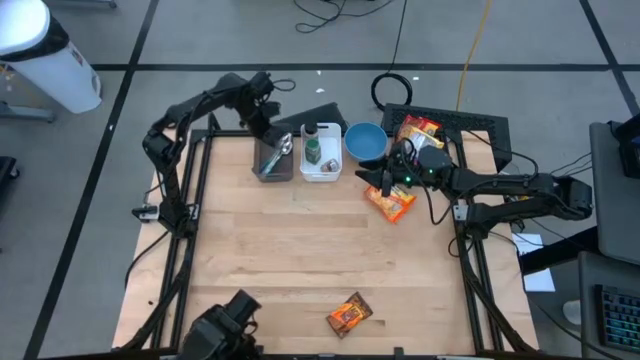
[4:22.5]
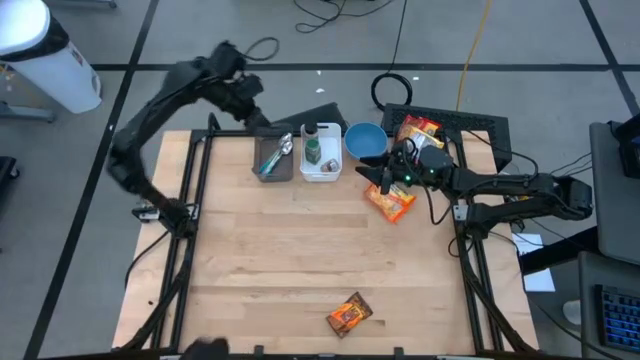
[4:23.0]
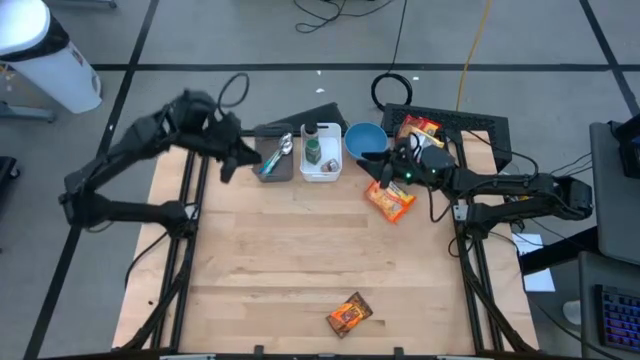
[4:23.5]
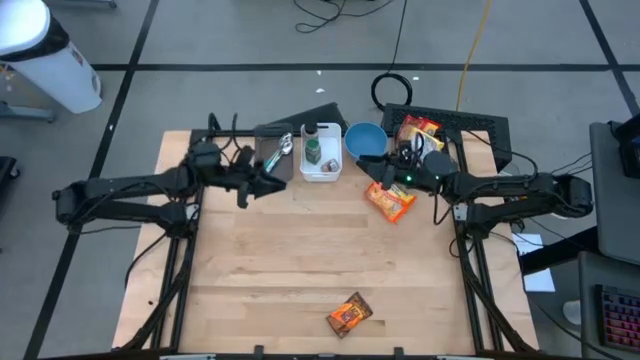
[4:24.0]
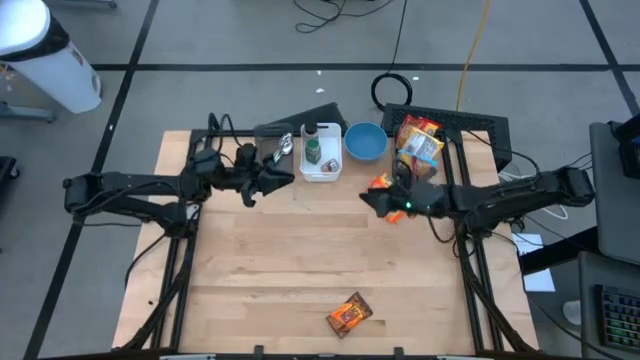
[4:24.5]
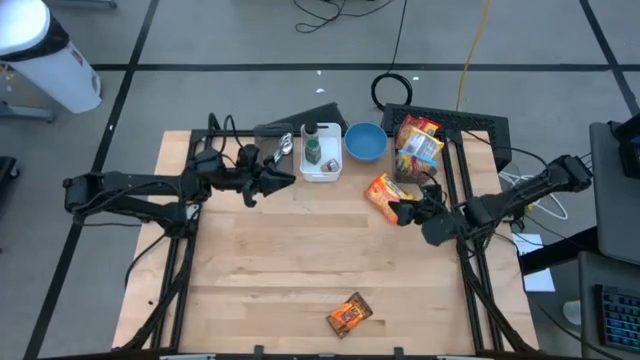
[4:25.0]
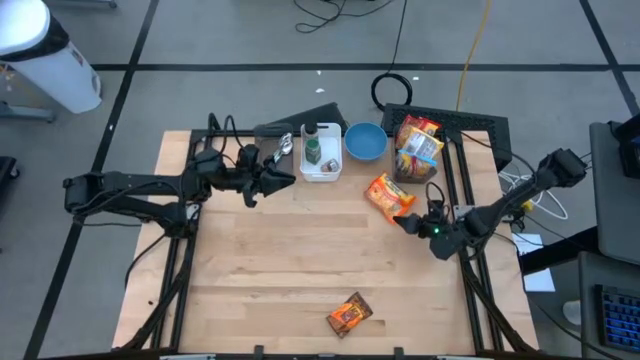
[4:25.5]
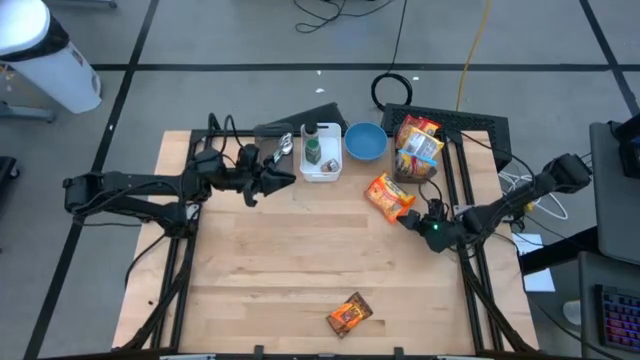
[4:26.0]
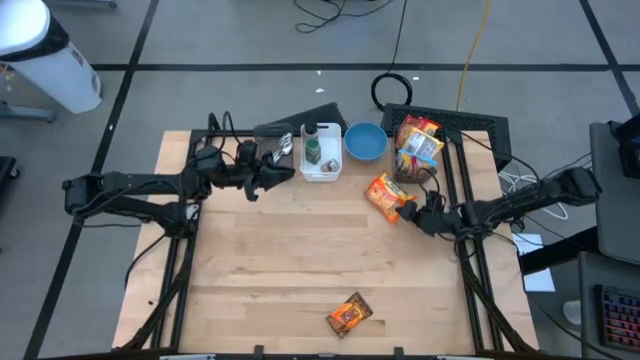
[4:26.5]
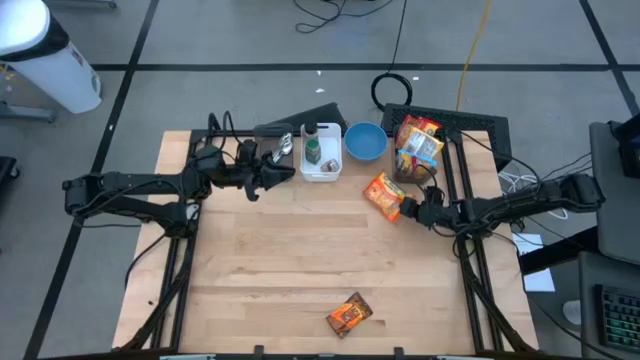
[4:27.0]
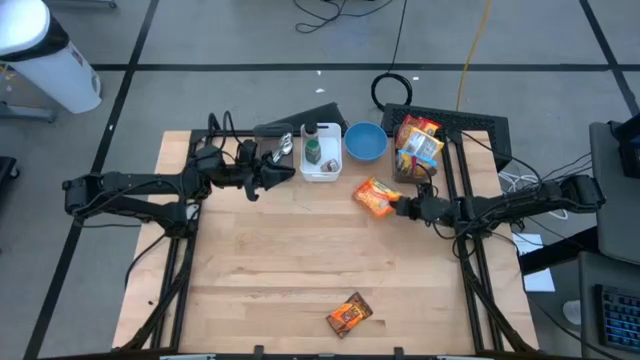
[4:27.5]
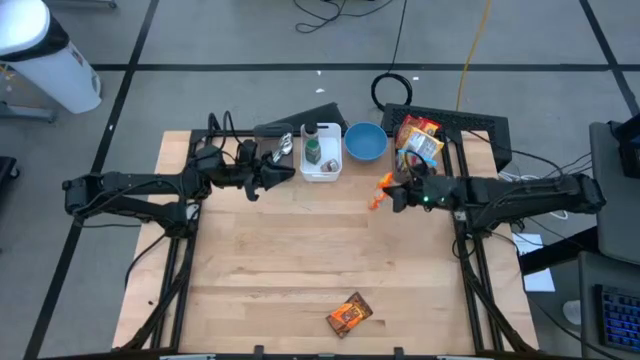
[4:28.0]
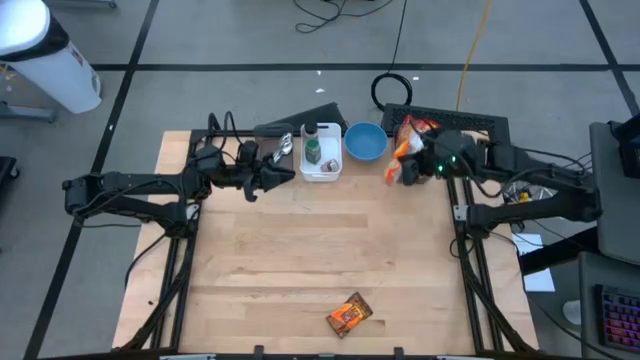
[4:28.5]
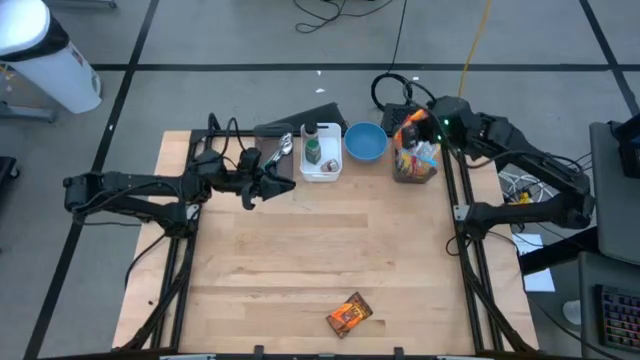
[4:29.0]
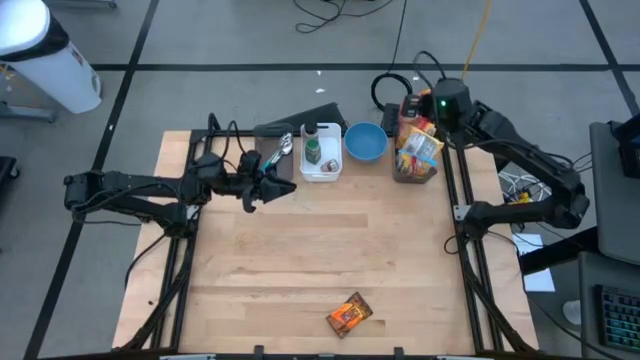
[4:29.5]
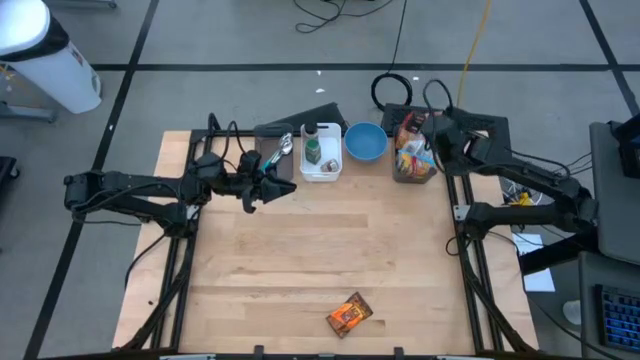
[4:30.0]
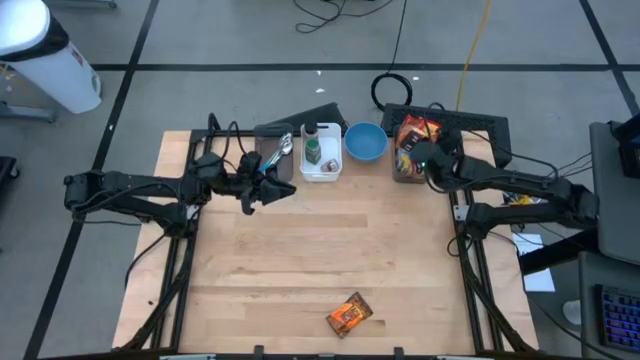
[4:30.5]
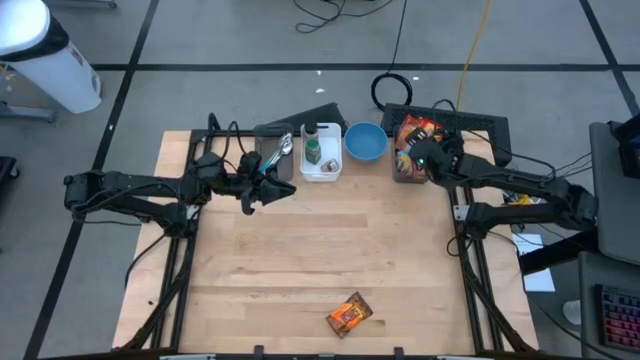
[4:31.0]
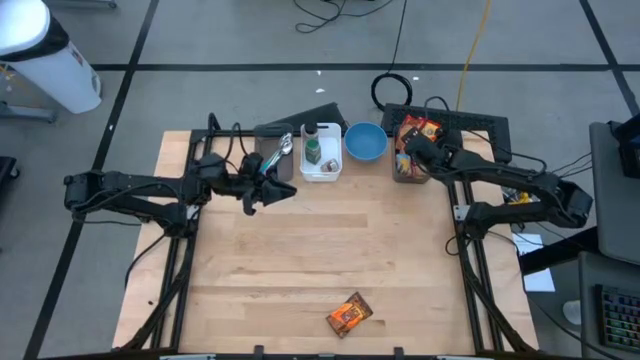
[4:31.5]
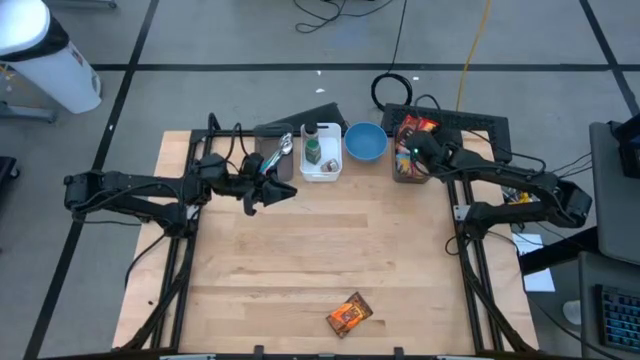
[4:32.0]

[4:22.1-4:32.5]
Task: Pick & Place Food Item
Put the orange noodle pack into the right black bin

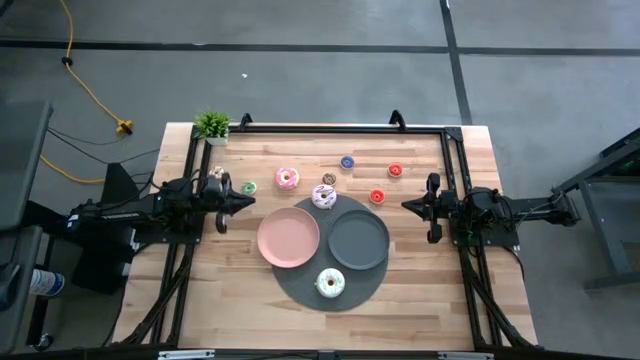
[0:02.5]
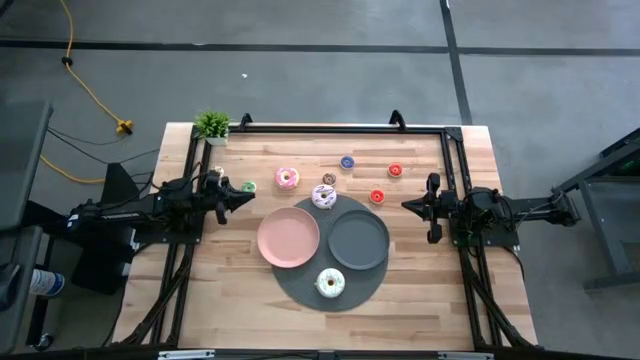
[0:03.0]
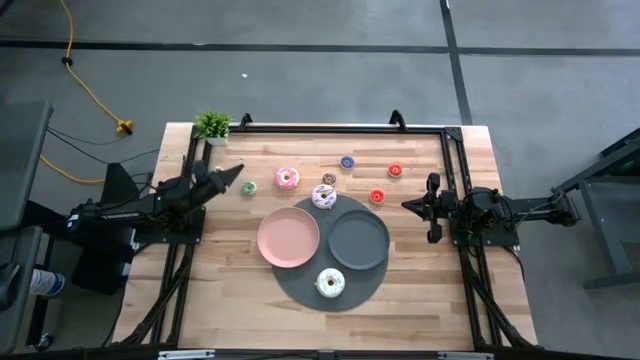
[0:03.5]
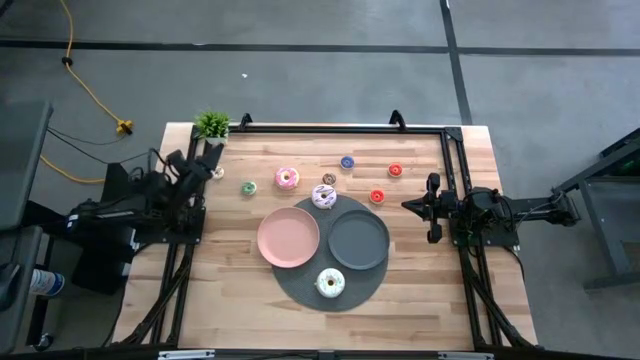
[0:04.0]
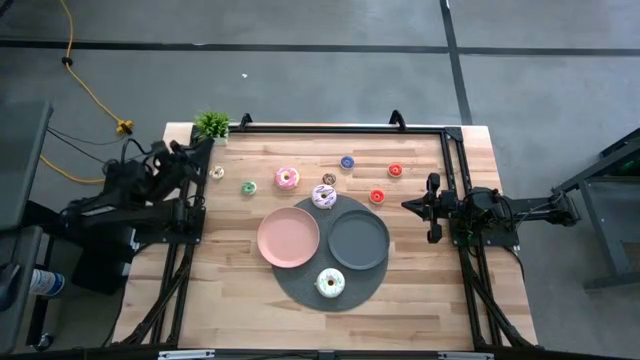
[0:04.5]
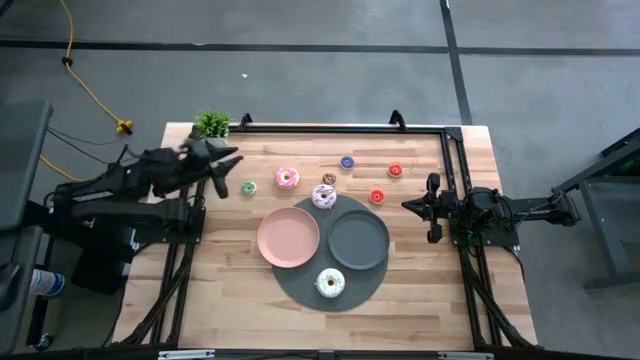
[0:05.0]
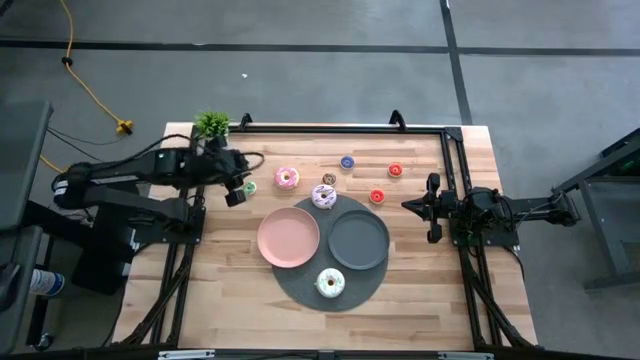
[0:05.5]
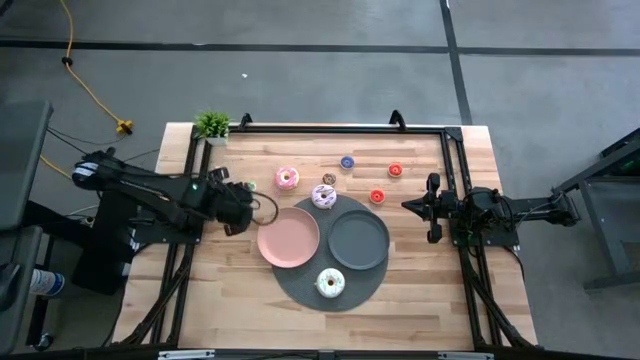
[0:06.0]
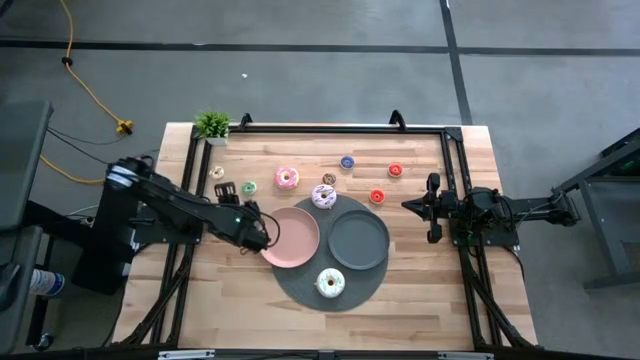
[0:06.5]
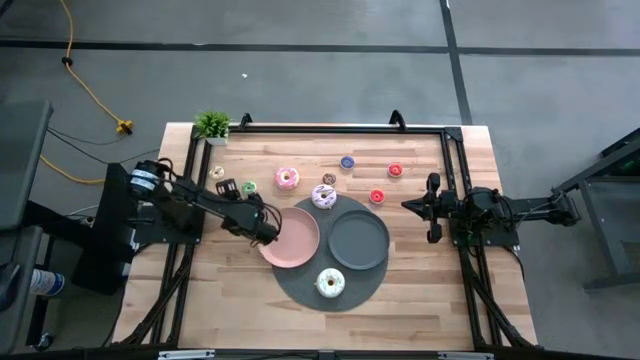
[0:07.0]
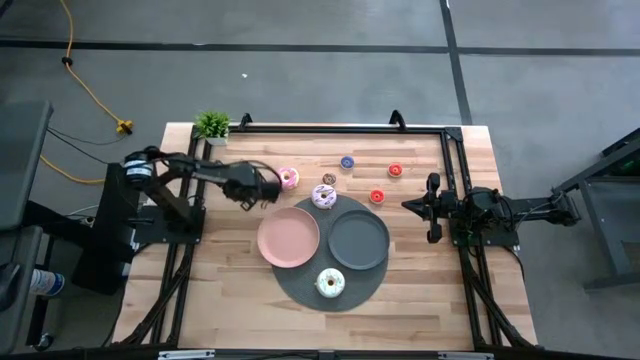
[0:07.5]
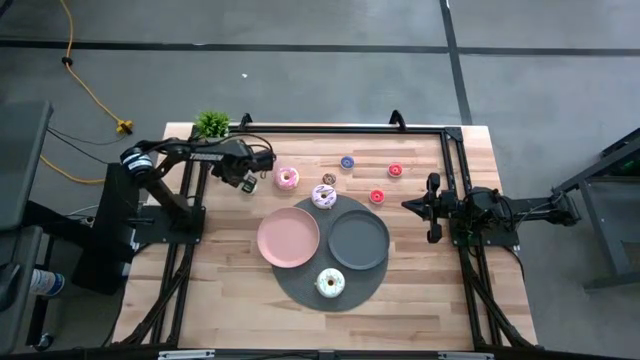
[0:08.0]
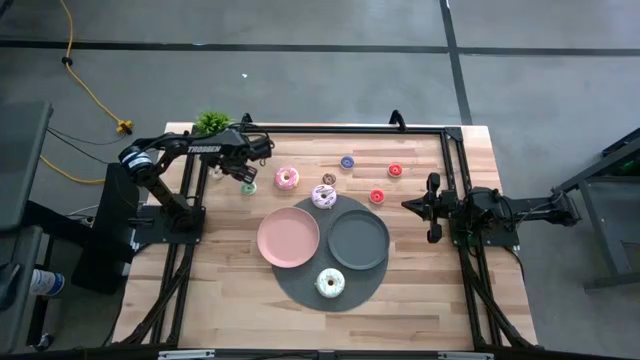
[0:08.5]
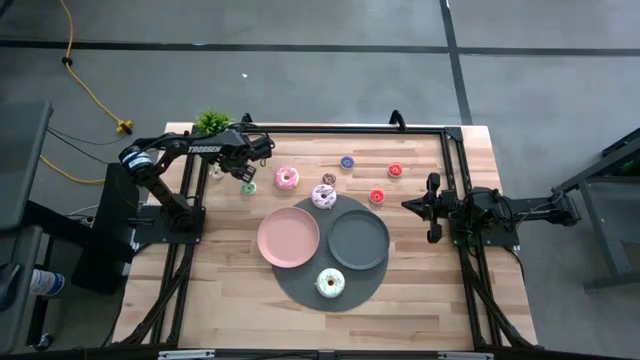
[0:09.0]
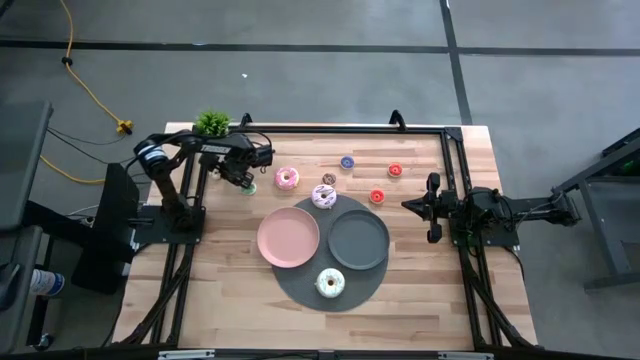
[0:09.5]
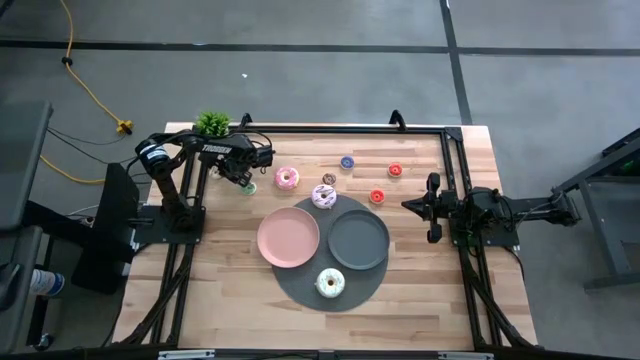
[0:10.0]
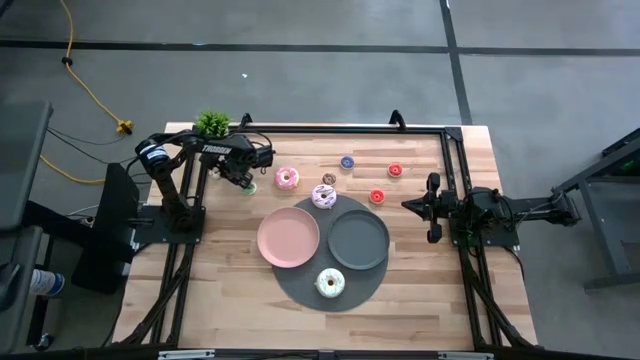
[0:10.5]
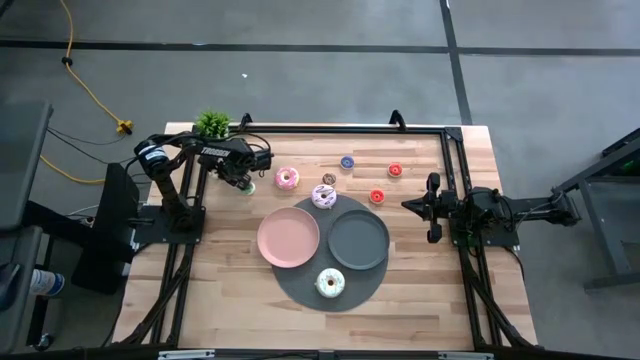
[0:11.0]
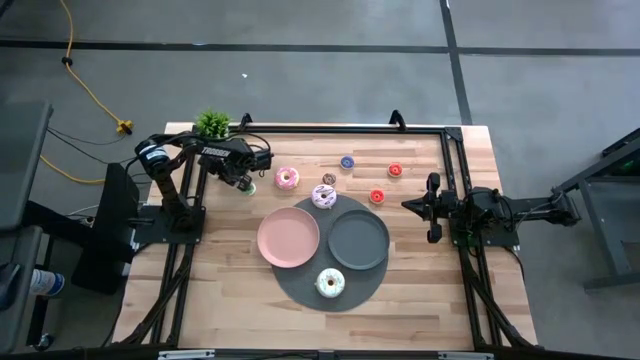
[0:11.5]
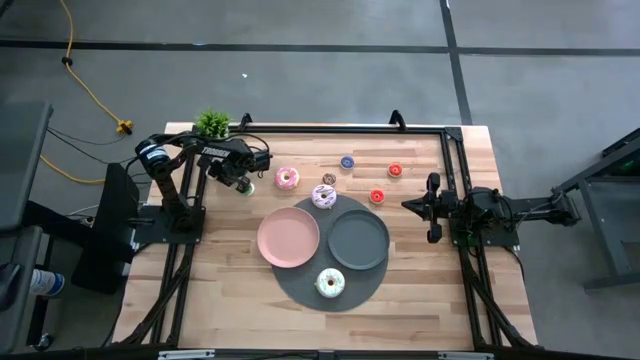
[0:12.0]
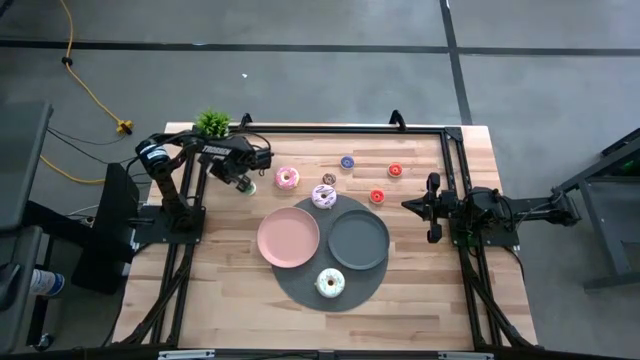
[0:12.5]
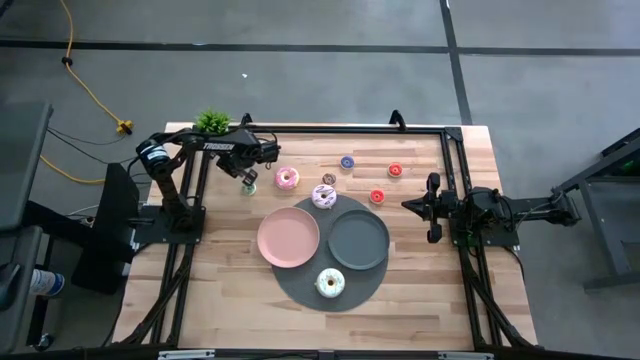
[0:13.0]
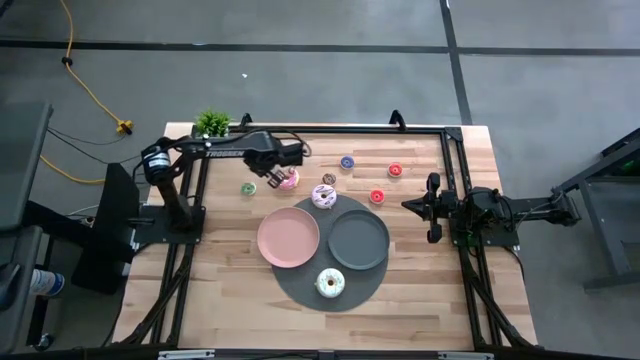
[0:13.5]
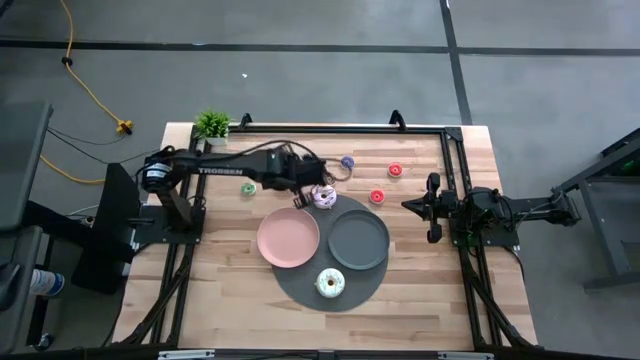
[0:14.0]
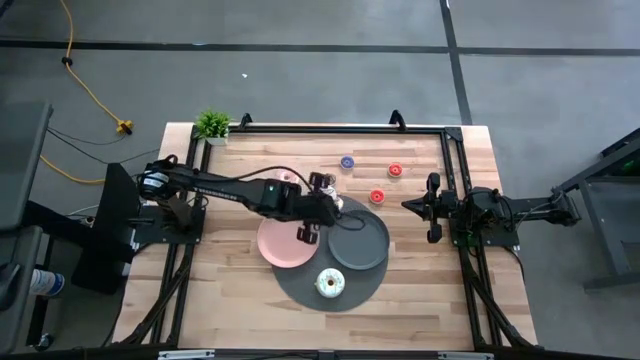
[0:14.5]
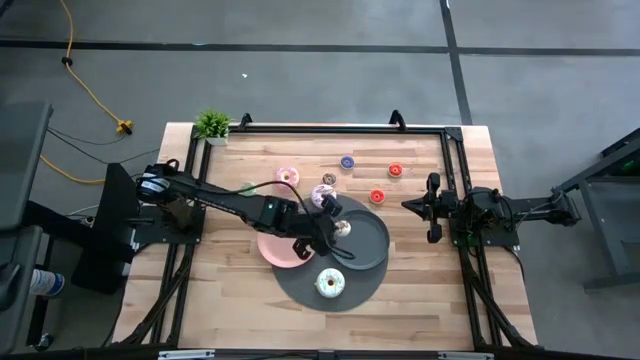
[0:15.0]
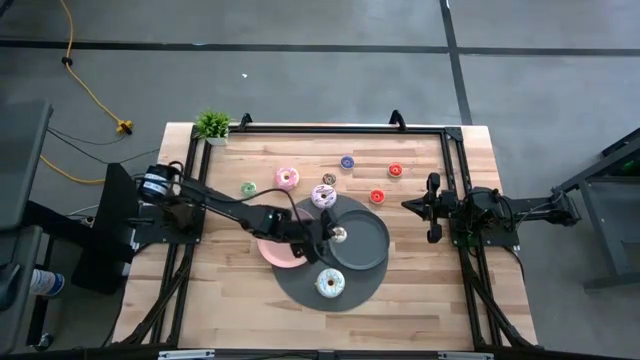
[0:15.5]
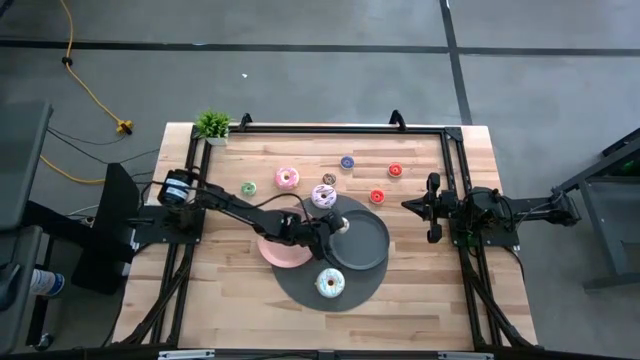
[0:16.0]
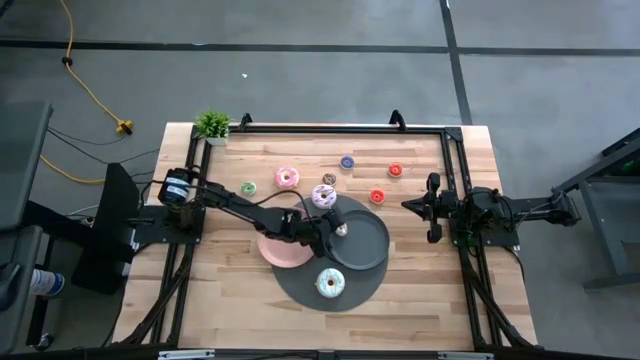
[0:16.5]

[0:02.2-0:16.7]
Task: Pick & Place donuts
Put the small white donut on the black plate
